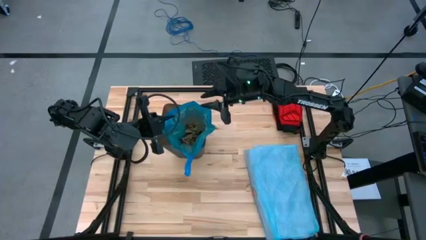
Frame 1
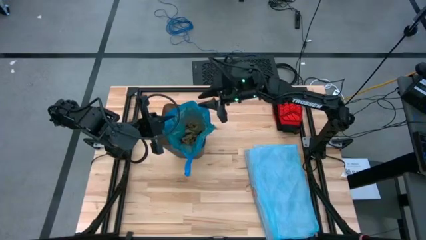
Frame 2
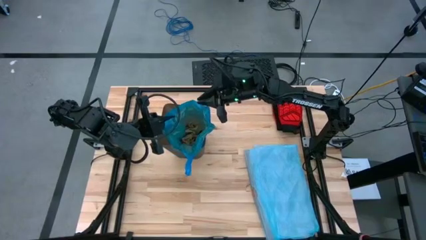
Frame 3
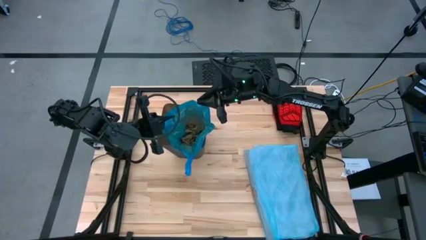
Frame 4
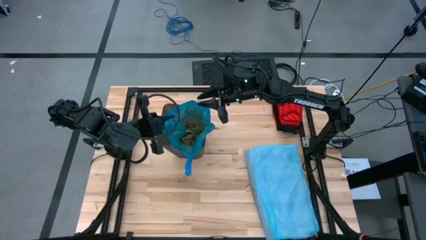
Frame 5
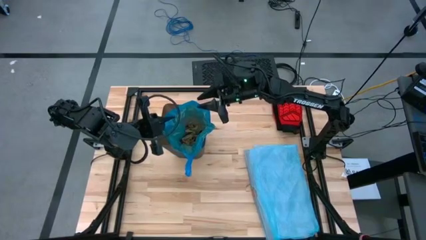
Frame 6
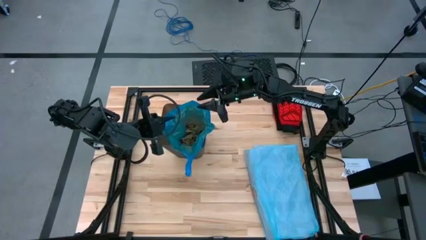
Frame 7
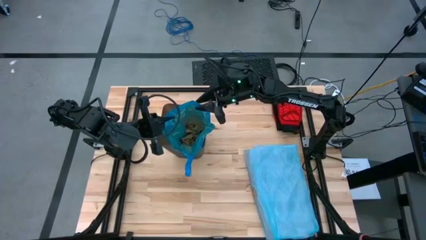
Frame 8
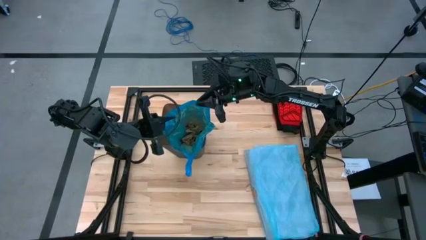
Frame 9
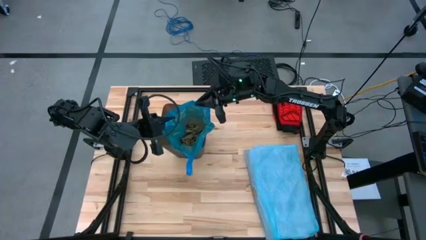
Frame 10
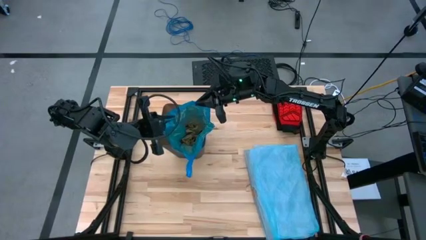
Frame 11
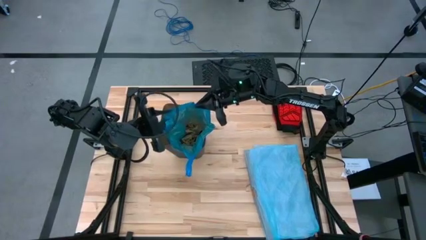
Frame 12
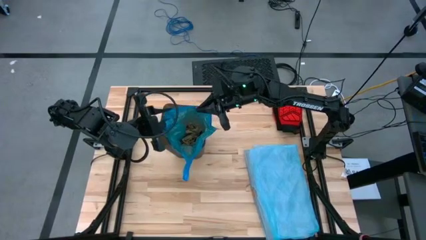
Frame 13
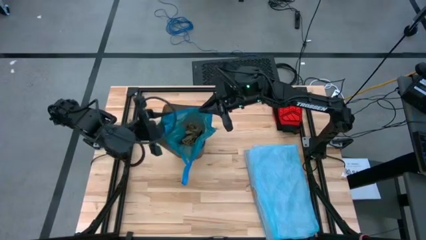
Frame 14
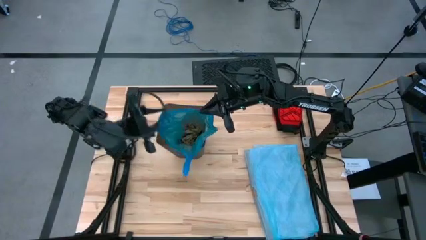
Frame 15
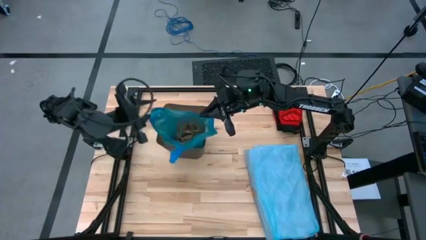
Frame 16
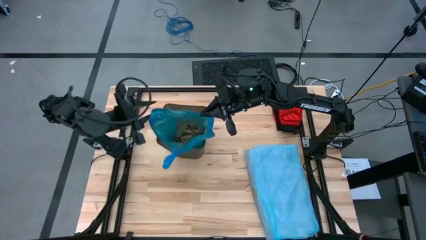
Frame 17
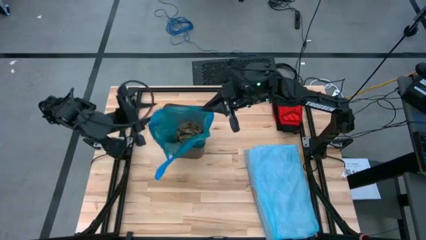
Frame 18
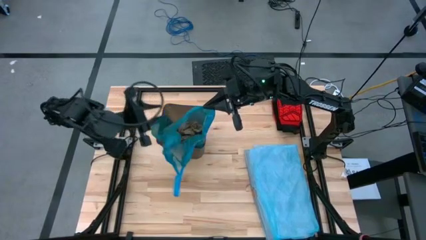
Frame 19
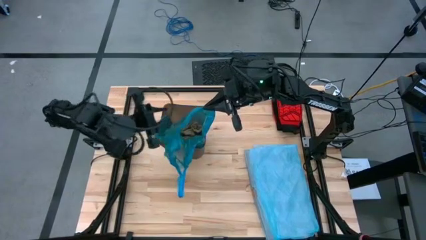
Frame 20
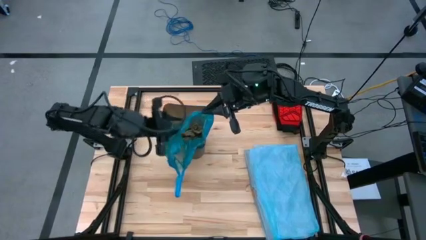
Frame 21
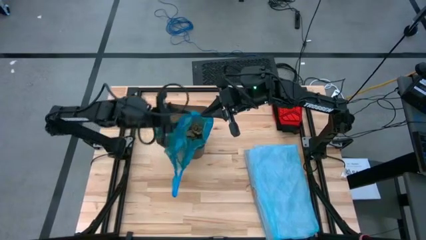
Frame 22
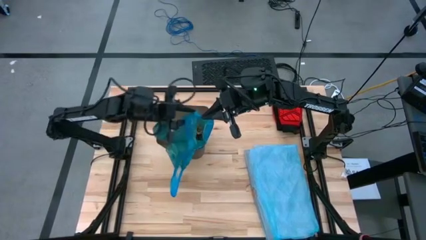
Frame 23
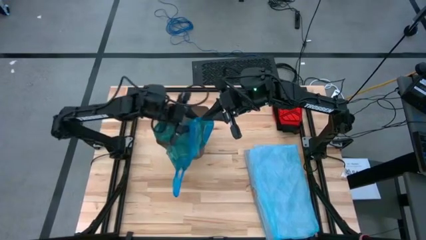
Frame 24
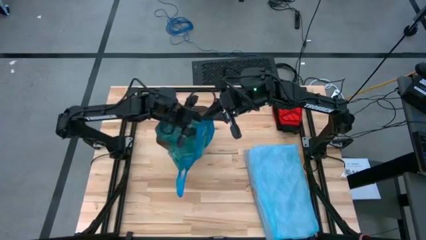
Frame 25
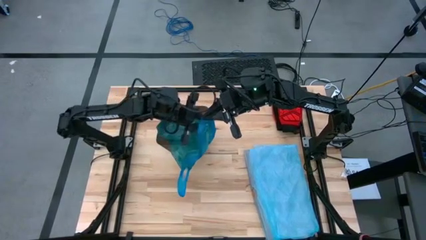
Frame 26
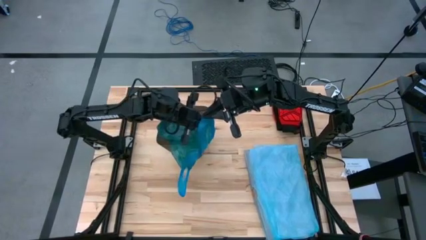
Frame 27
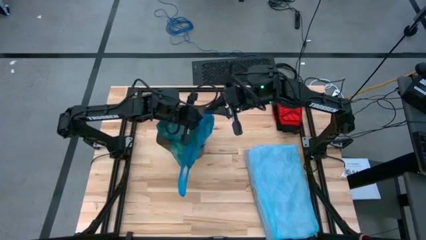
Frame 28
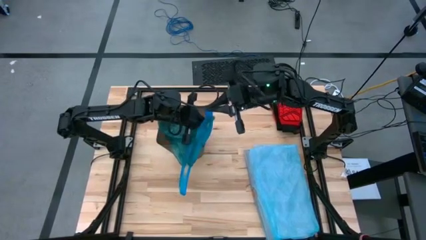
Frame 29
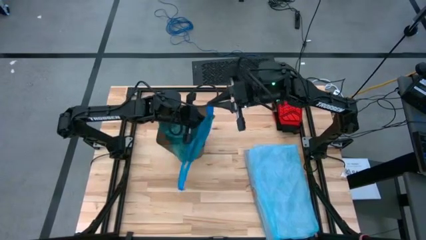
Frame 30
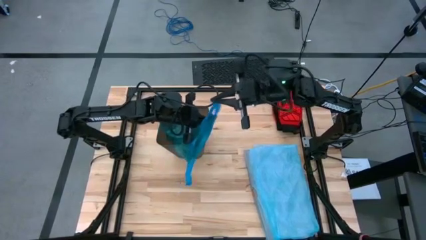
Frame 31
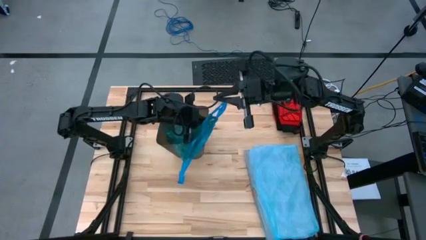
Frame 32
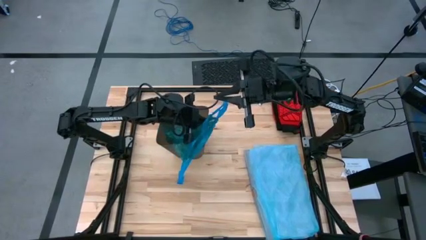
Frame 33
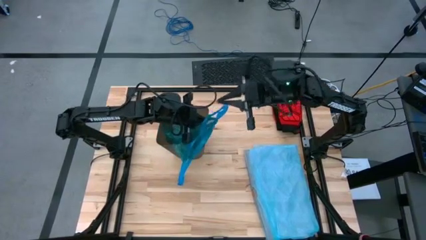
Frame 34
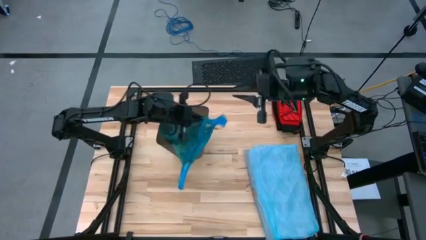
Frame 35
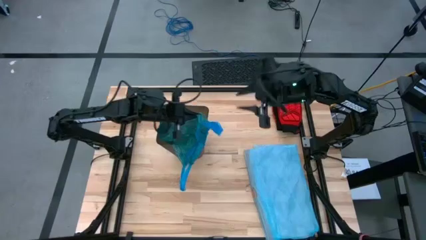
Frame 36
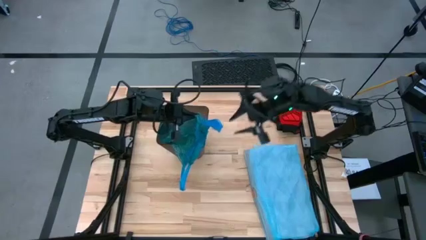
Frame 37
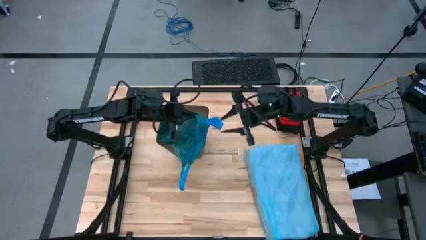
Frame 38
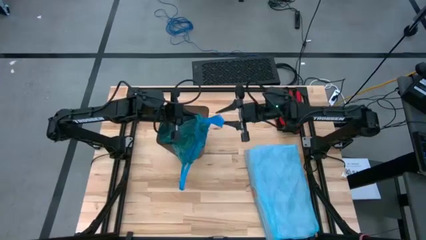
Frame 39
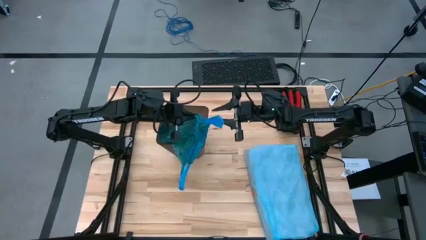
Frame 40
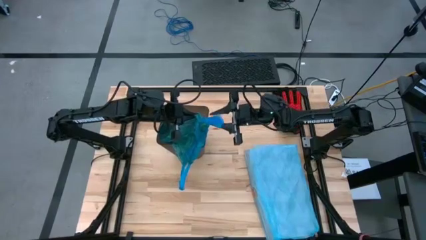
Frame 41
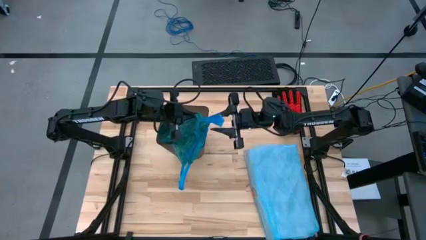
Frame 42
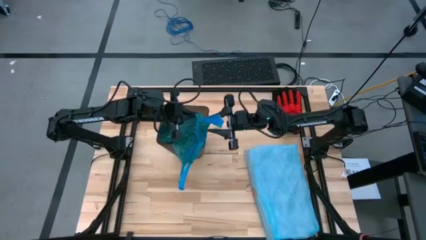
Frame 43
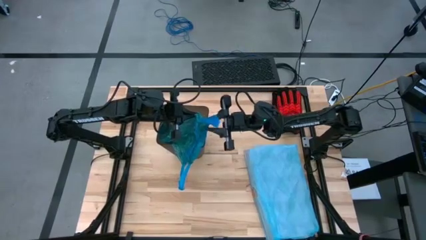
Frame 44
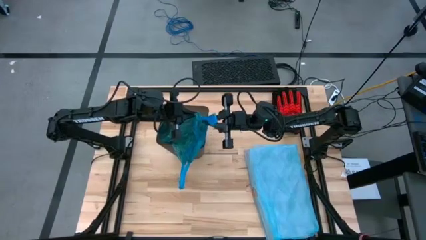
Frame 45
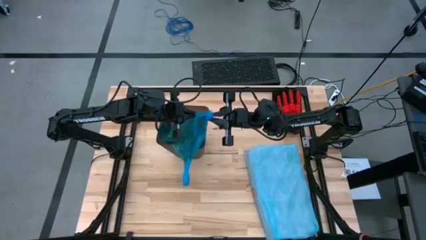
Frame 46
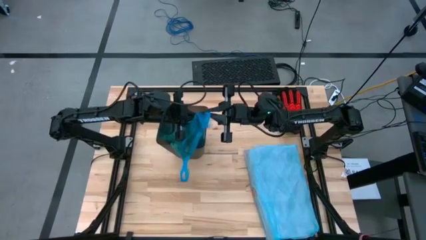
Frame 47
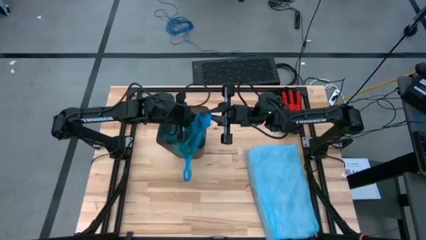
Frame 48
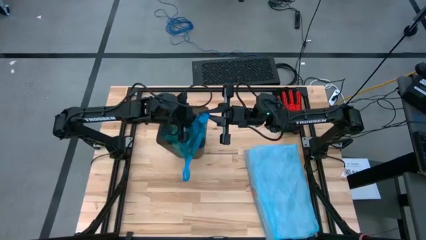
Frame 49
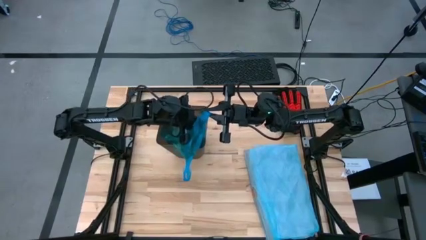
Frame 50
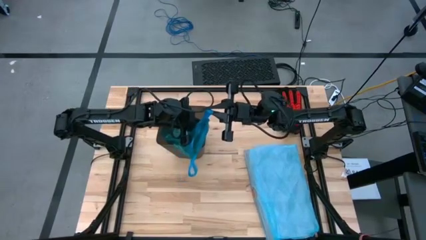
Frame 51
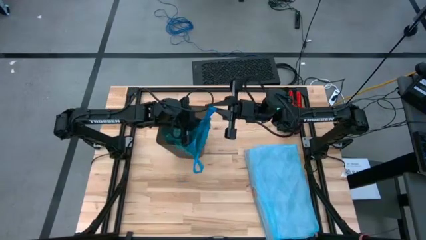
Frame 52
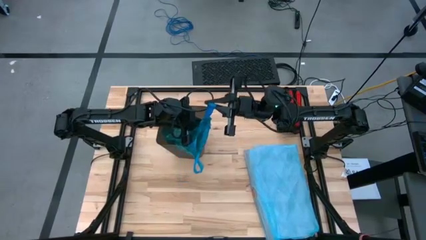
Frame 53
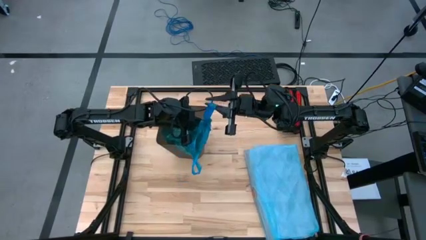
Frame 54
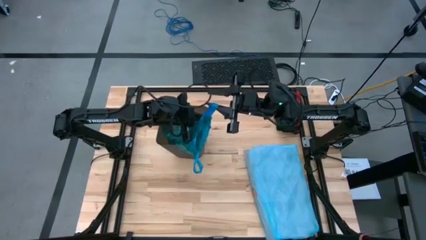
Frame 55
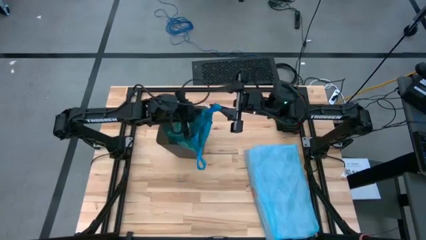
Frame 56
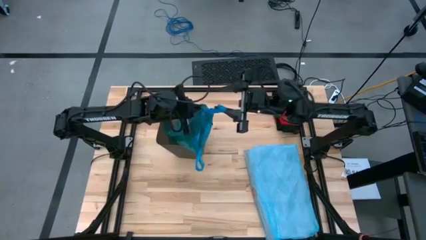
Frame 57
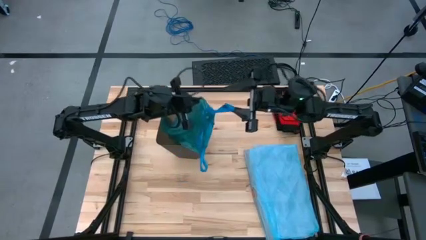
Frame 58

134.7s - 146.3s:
Task: place trash/remove bag and relplace
Remove the trash bag from the bin

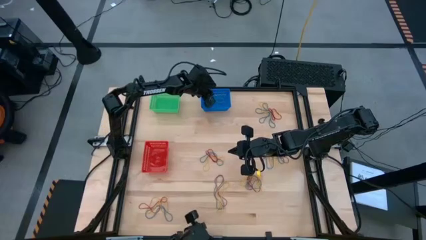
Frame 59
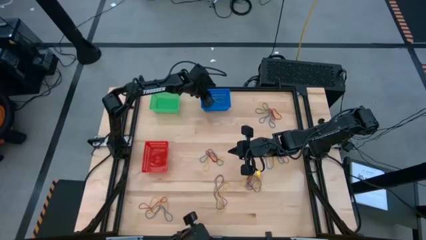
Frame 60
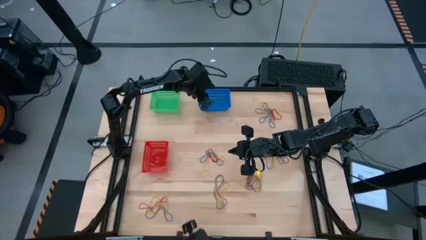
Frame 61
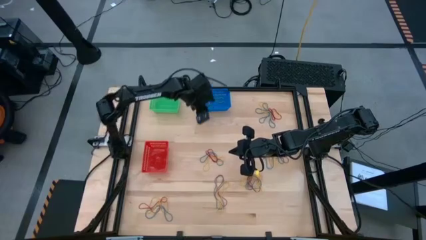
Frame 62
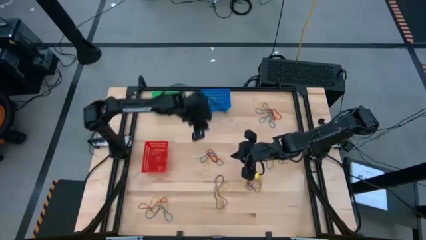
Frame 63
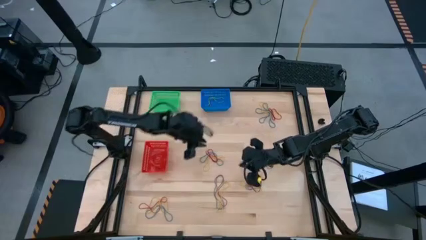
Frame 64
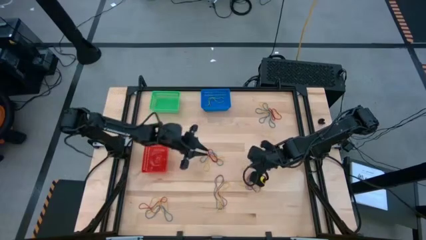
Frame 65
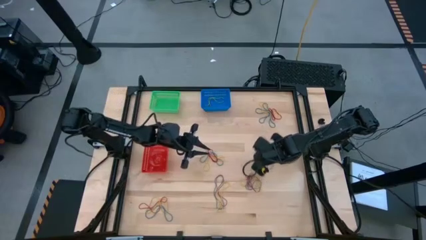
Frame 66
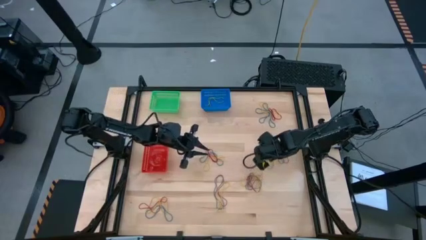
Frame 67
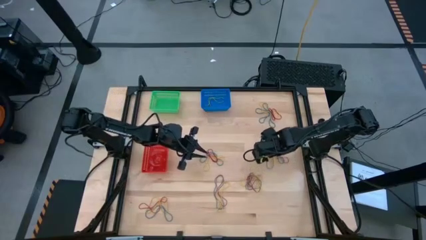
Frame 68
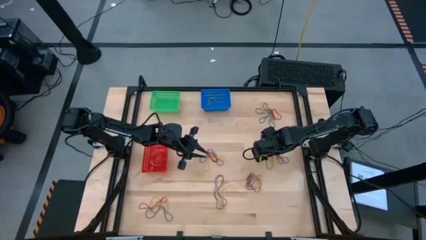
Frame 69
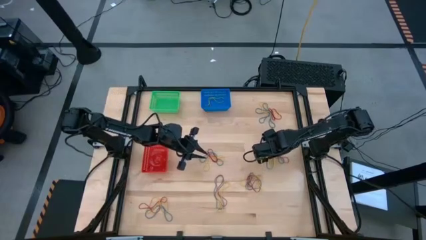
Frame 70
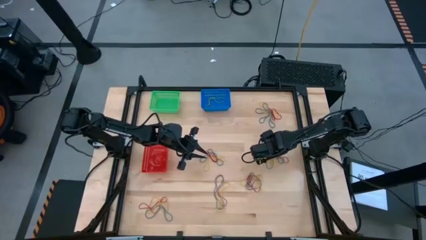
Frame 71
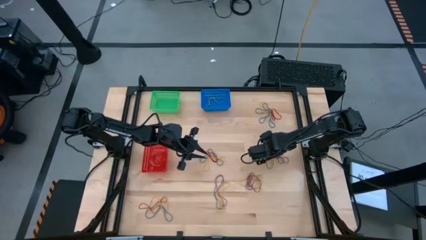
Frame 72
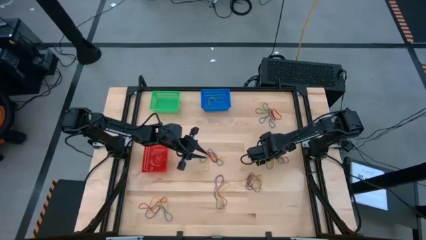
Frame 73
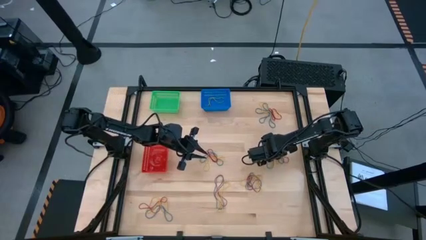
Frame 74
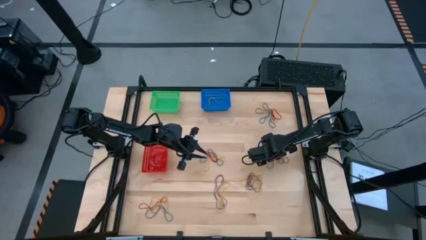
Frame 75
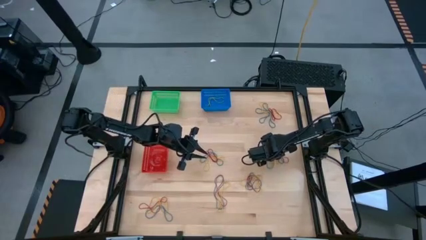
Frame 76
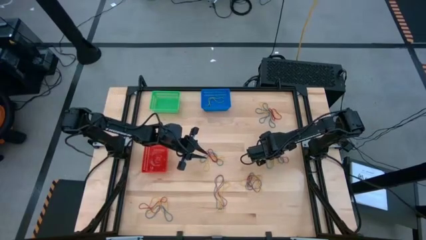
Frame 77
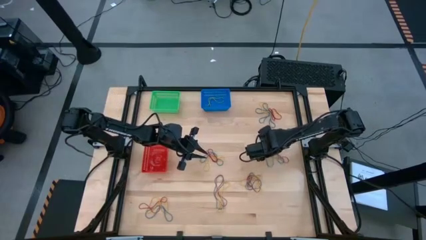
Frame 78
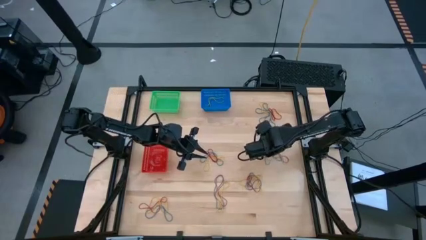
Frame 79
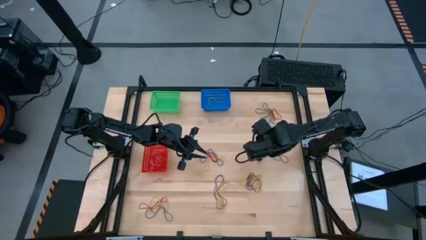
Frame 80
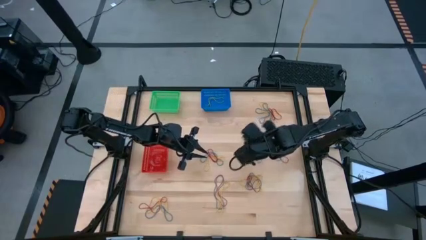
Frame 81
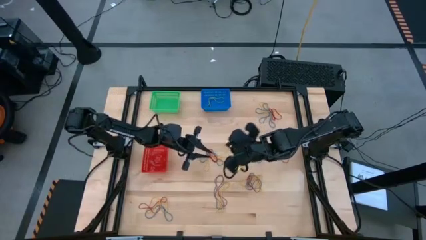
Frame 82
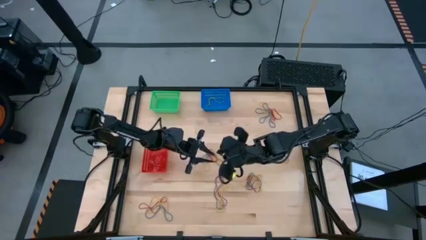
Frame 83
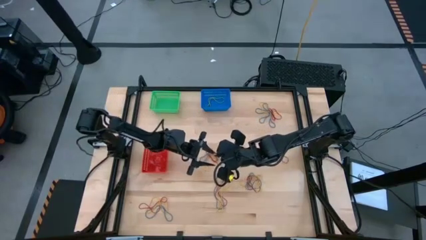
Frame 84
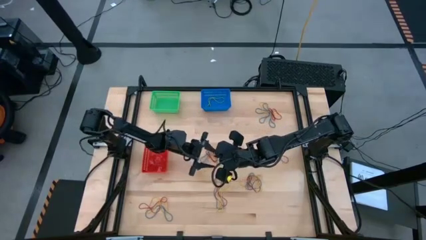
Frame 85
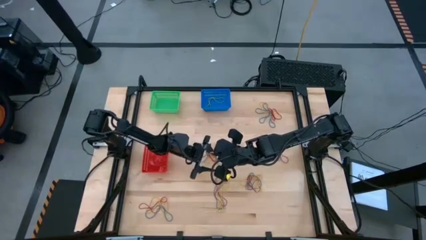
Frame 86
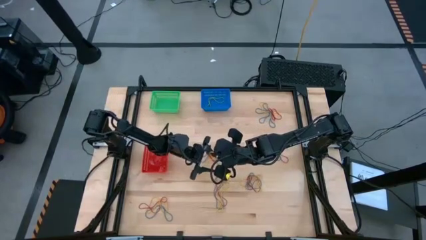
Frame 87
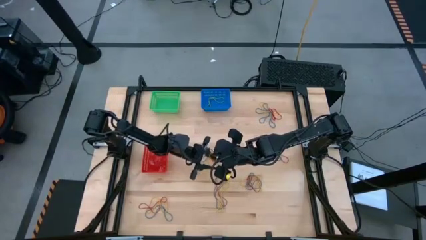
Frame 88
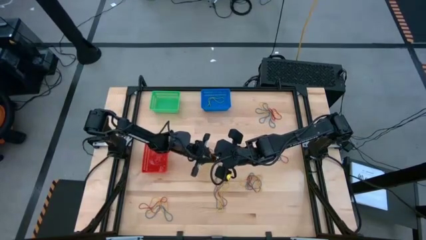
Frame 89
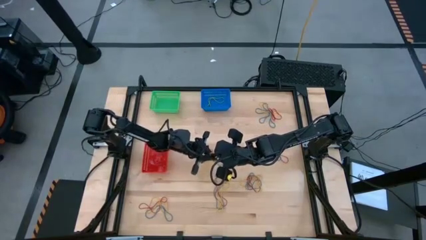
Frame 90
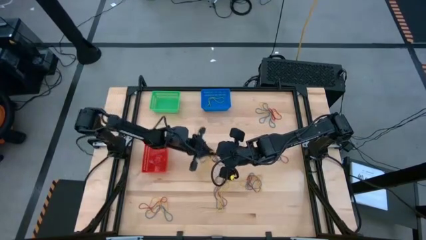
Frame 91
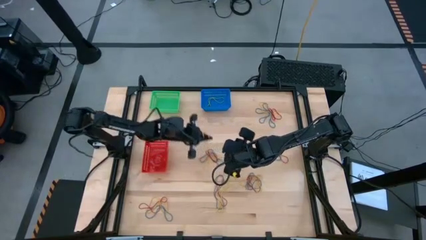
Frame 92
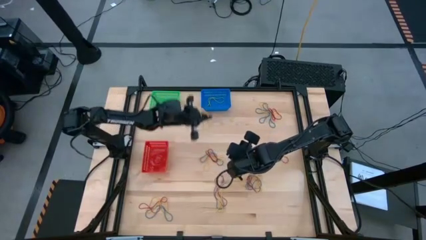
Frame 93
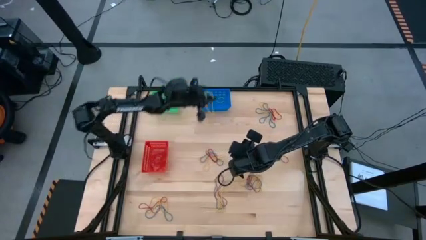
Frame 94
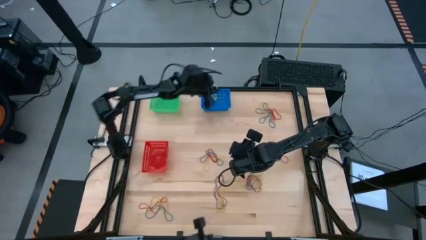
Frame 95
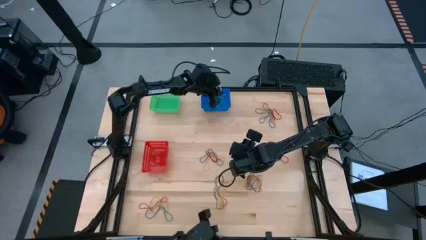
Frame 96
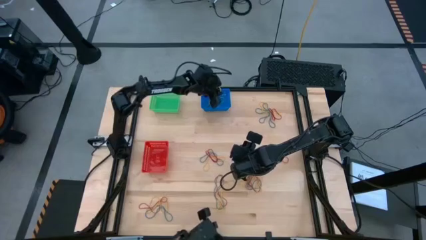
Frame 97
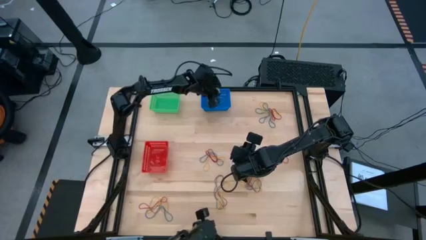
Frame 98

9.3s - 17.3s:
Task: Sort rubber bands into baskets
Put the yellow rubber band into the blue bin
